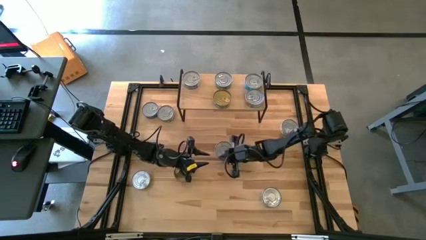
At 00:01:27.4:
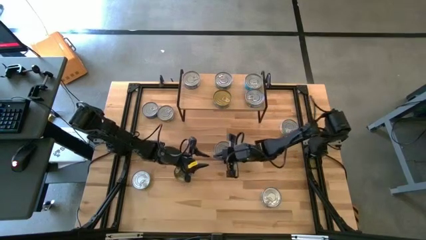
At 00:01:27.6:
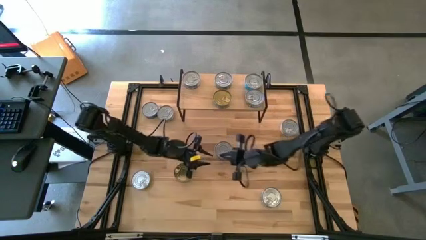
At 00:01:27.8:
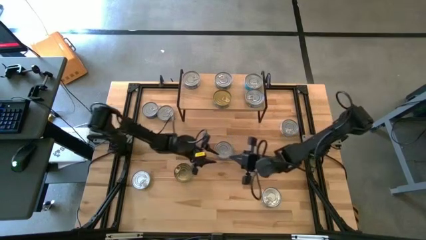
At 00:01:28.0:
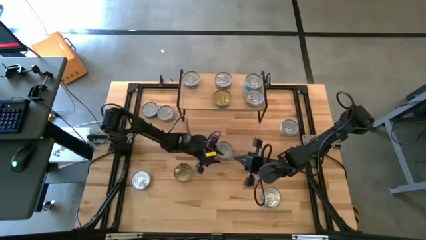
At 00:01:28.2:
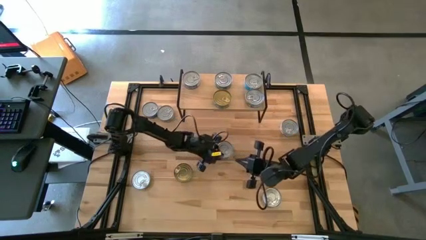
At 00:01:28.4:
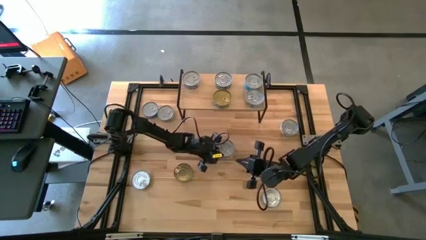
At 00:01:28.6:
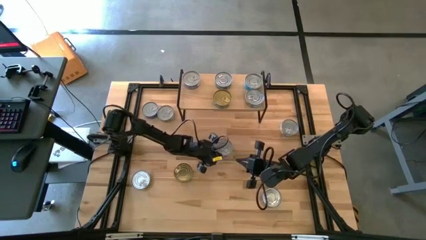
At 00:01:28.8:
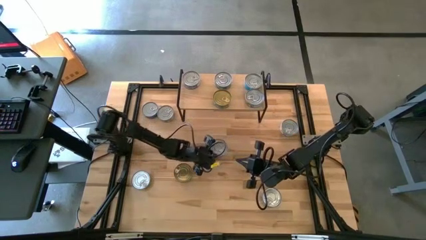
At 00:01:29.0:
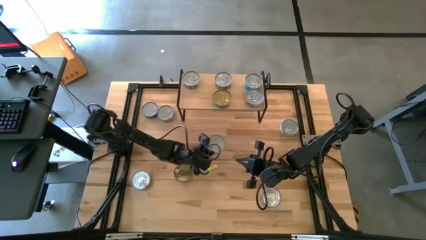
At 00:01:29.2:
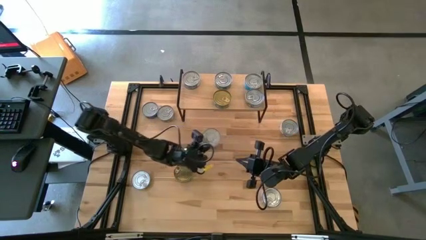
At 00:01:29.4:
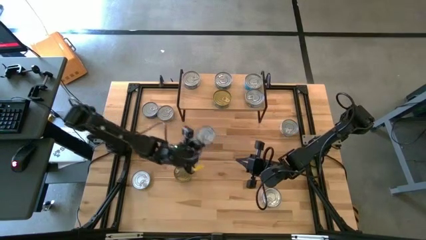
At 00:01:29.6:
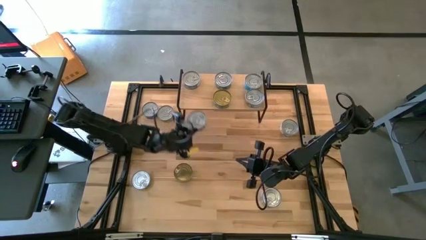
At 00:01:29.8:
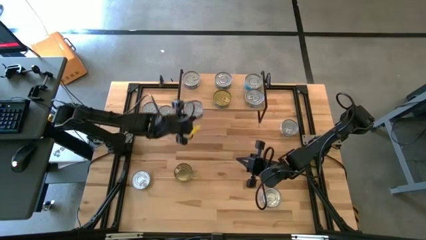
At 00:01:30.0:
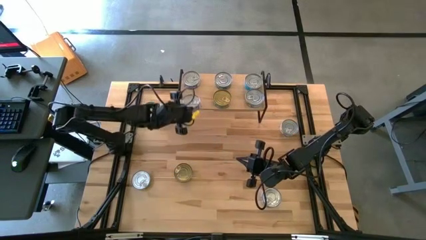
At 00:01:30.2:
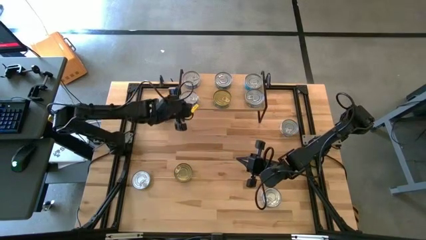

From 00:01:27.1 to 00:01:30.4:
Task: Stack canned seafood by type on shelf
Put the blue tuna can on the shelf aligned with the other blue tuna can

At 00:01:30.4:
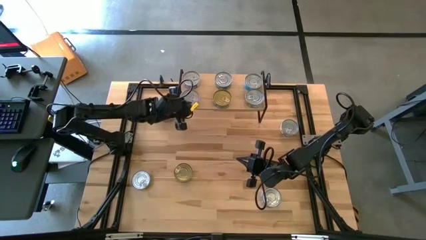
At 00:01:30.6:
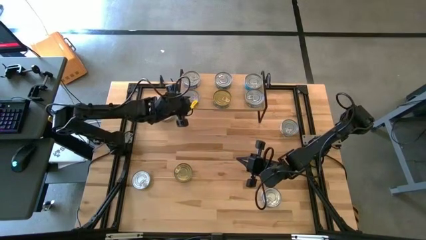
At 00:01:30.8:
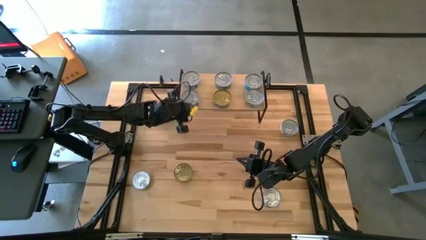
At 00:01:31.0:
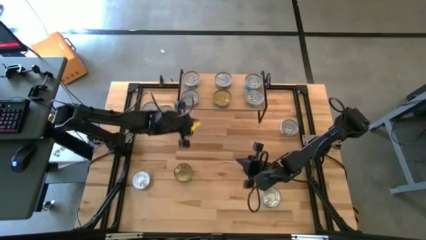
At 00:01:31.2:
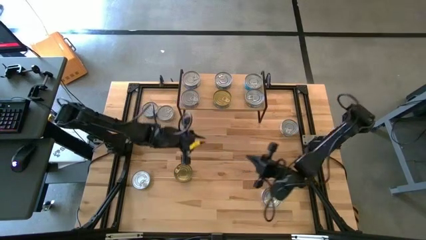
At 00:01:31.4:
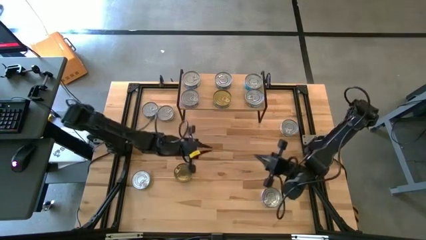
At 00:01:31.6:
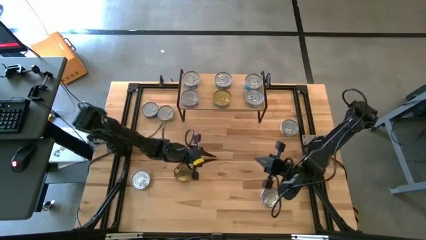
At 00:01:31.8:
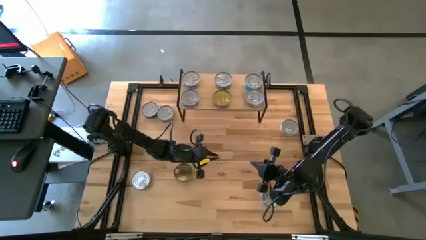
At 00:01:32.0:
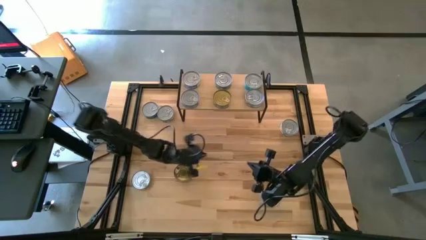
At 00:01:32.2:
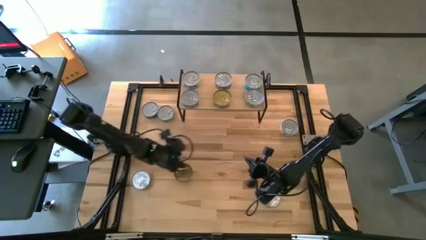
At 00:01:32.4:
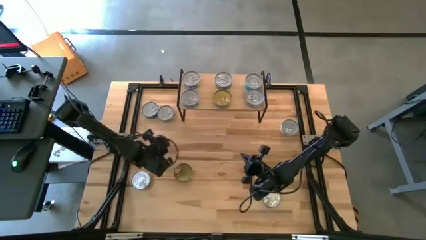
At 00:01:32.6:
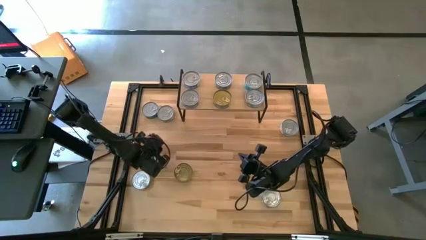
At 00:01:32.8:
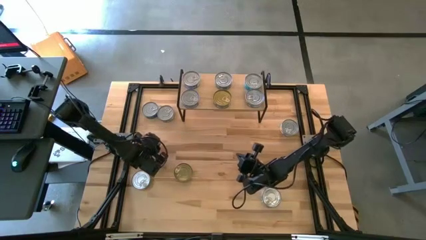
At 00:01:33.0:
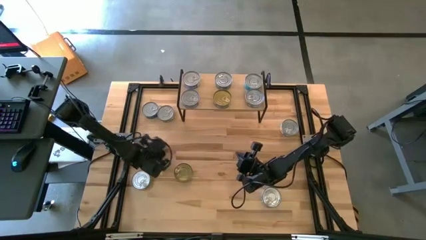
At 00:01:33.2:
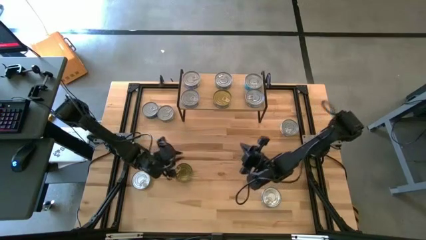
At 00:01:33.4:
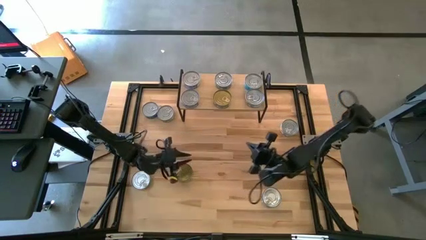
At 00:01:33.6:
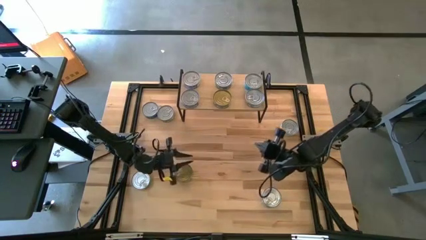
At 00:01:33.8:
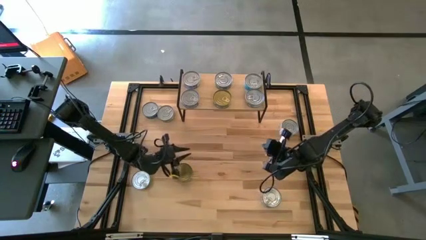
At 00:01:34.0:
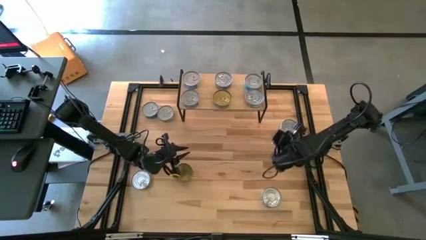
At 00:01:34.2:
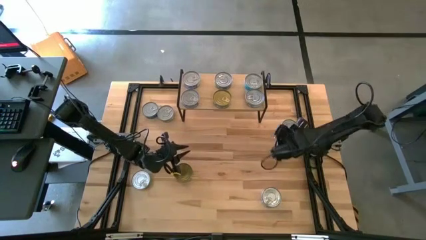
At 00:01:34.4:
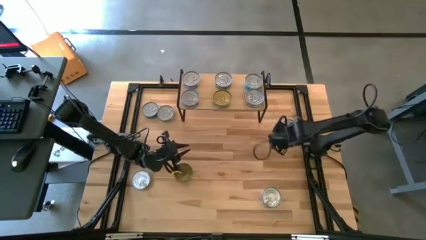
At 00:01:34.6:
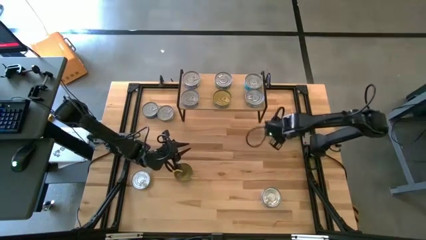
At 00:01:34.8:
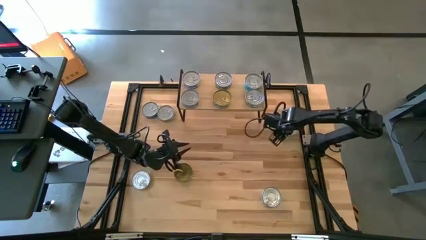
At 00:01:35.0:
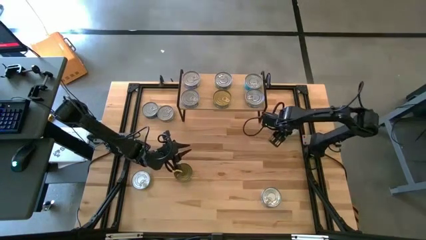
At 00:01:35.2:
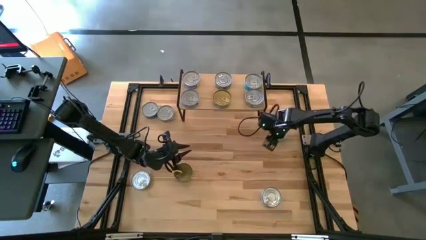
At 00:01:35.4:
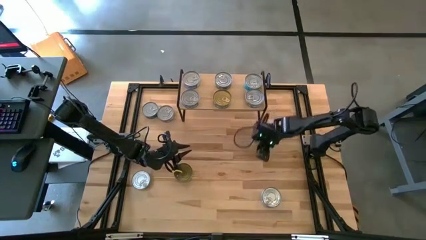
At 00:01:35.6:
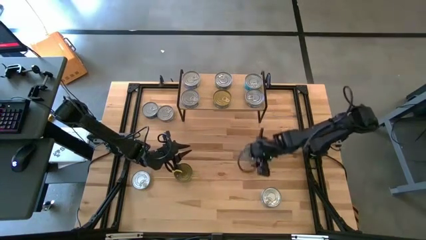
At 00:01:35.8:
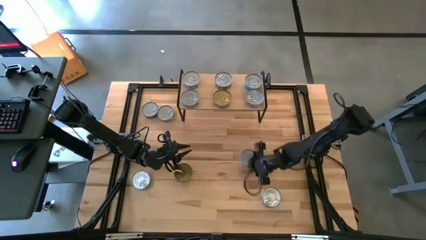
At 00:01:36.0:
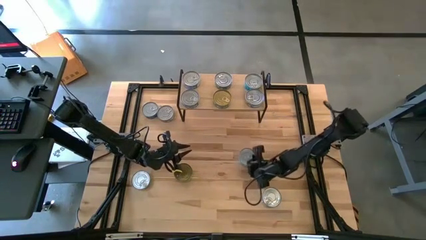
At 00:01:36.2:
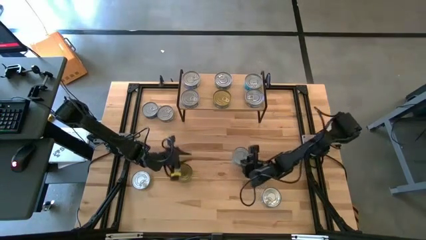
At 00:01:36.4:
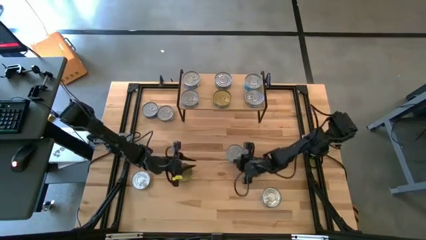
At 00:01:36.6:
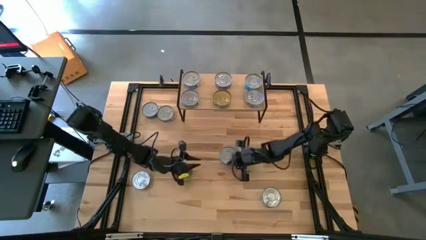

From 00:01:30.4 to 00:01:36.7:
Stack the yellow tuna can on top of the yellow tuna can on the shelf

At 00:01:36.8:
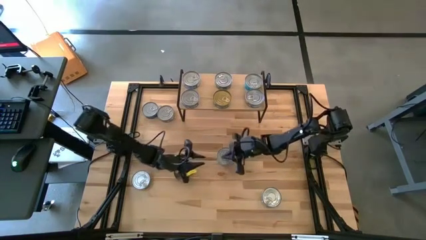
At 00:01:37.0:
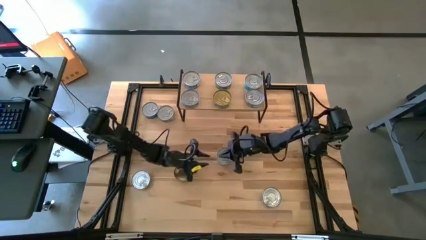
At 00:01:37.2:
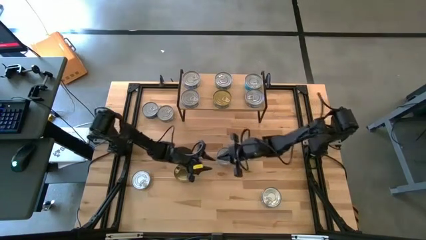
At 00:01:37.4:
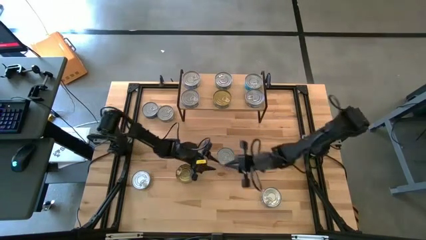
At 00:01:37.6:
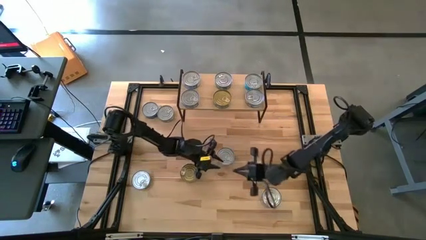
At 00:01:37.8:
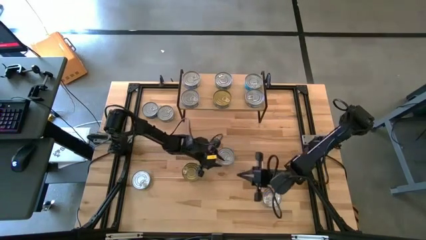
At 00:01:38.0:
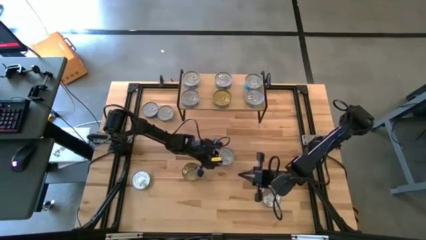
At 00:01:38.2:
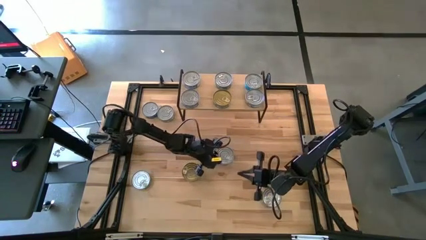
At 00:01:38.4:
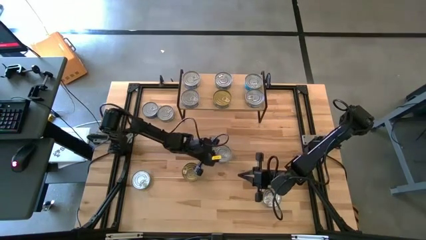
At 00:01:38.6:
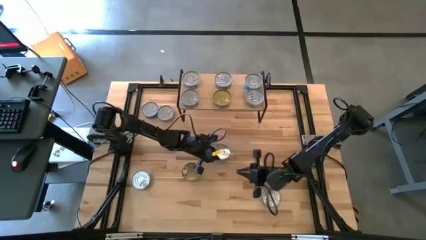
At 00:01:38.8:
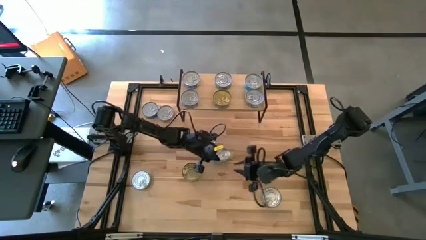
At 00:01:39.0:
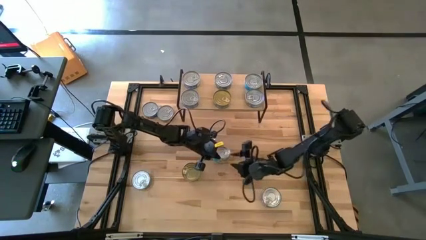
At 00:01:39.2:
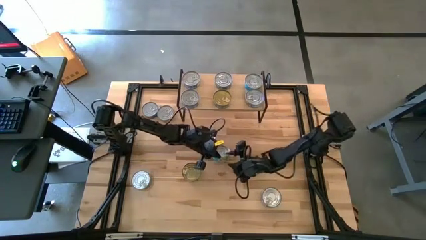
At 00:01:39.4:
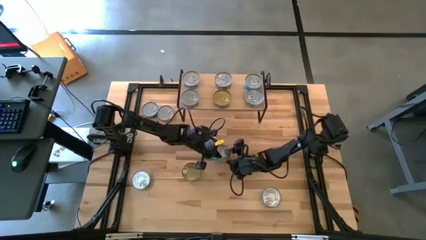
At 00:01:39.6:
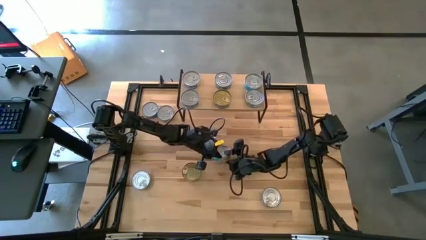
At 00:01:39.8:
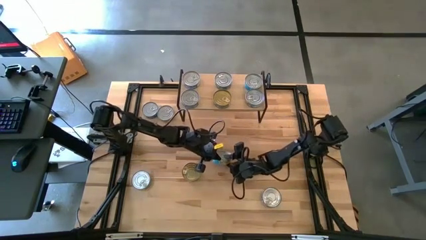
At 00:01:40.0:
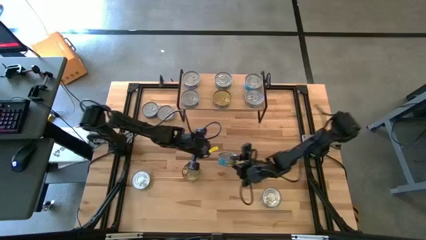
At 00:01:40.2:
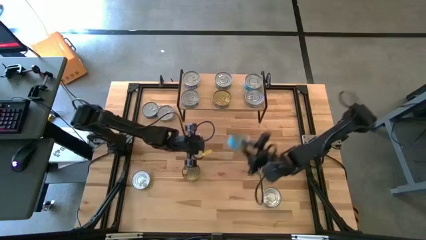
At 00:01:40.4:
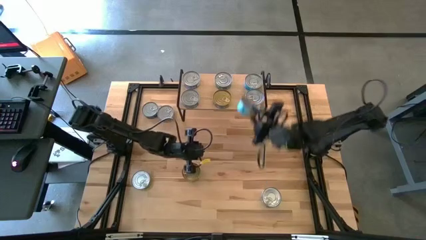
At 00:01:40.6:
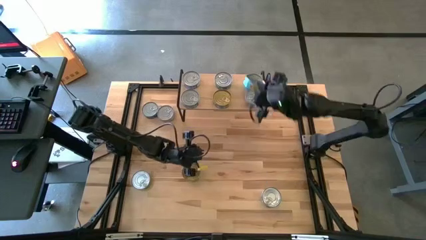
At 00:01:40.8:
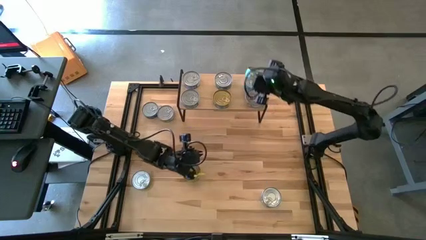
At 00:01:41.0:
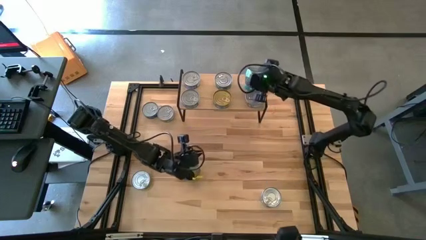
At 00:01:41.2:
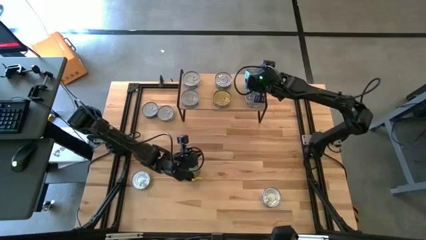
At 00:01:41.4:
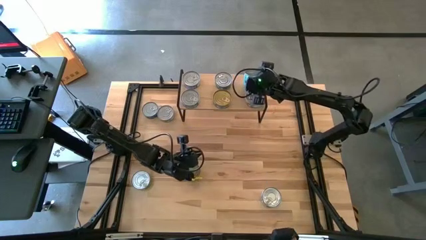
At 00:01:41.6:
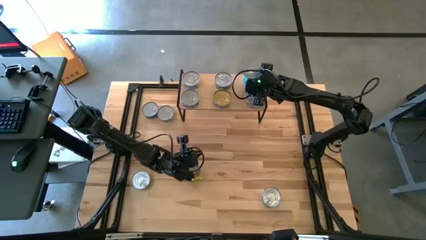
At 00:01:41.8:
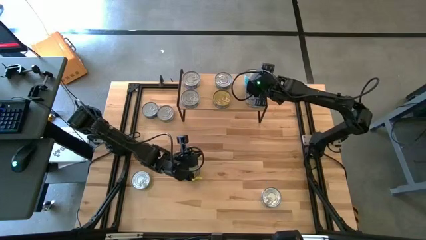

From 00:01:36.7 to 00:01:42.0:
Stack the yellow tuna can on top of the yellow tuna can on the shelf

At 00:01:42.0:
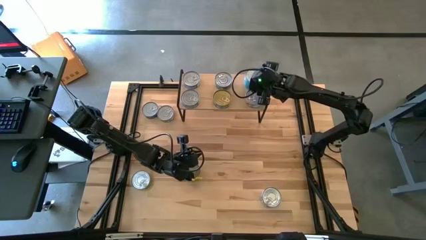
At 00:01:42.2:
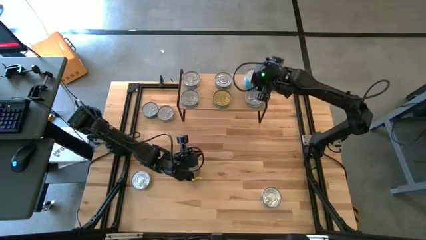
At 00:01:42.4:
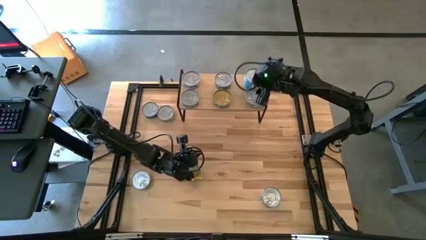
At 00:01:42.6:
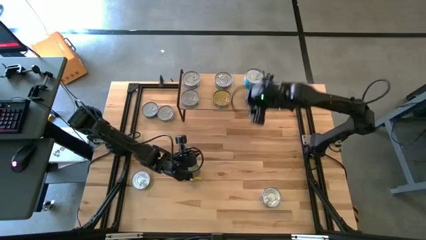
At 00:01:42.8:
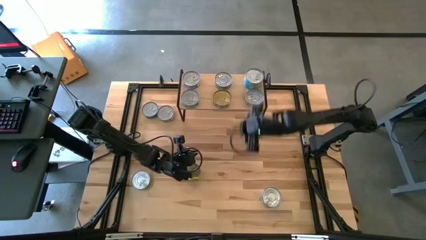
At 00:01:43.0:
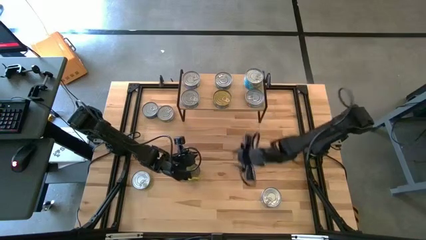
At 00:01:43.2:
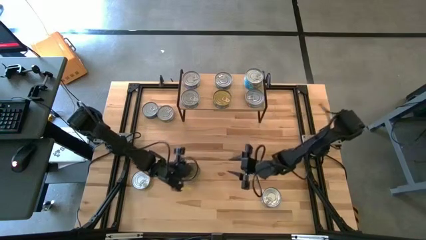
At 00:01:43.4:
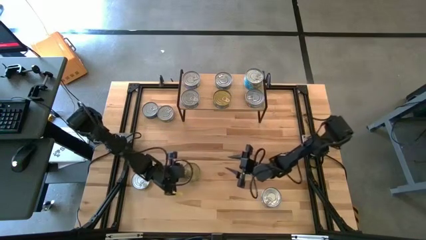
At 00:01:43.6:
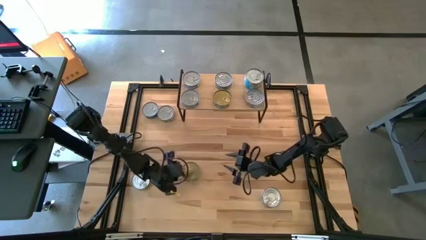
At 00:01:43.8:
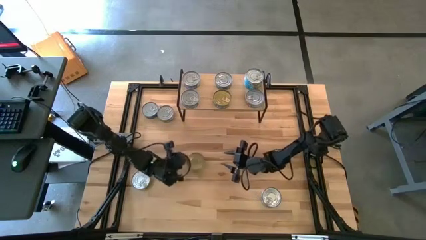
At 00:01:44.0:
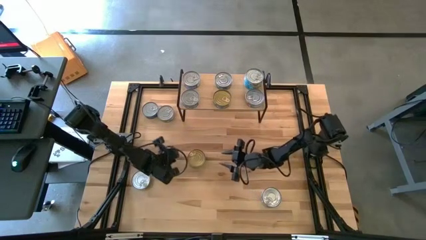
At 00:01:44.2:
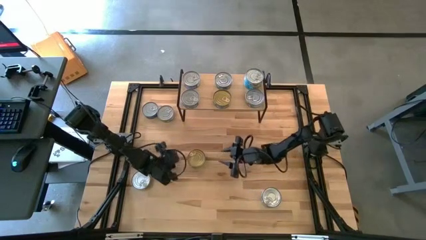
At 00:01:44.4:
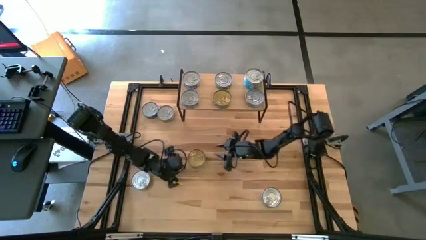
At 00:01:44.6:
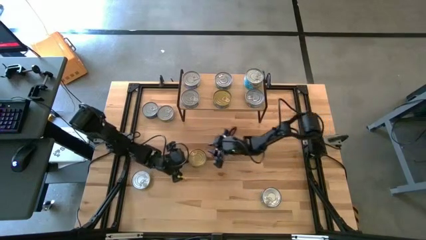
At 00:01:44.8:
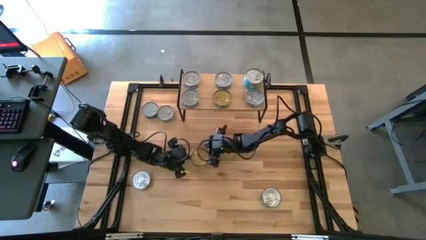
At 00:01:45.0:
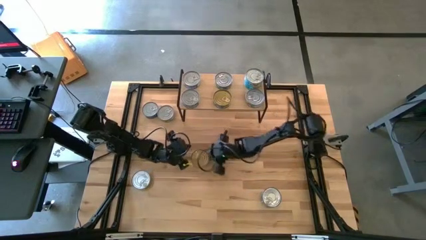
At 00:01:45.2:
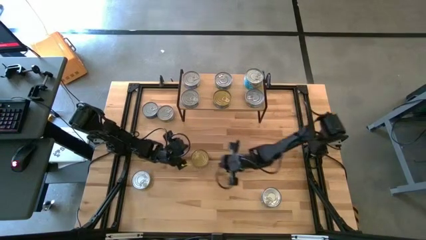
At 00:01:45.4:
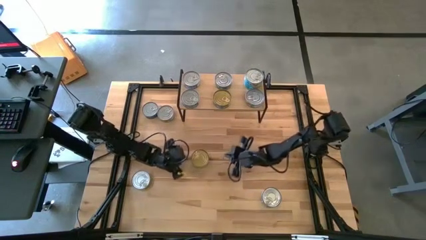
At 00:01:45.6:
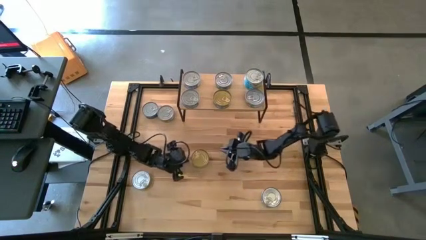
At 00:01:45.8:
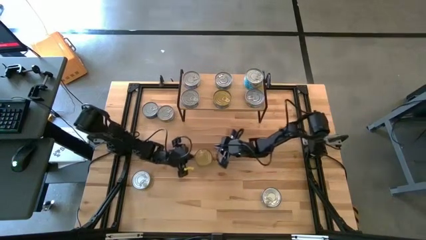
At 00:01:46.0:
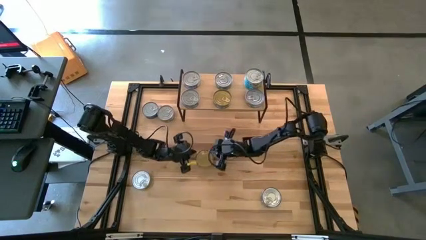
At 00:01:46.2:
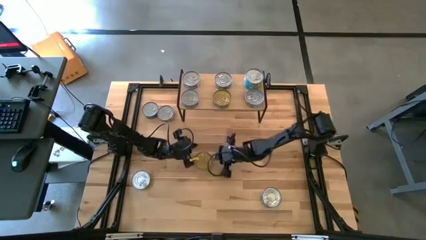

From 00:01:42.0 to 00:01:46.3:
Adjust the green tuna can on the table
